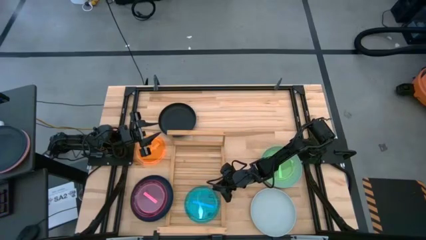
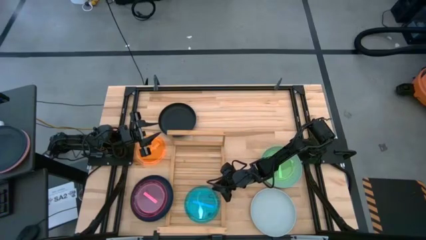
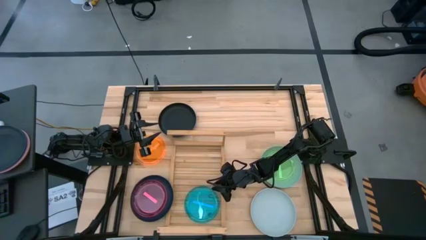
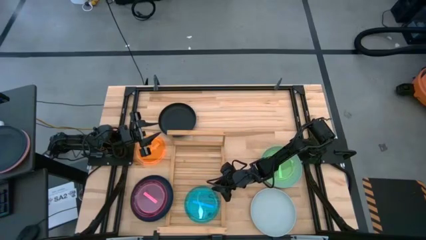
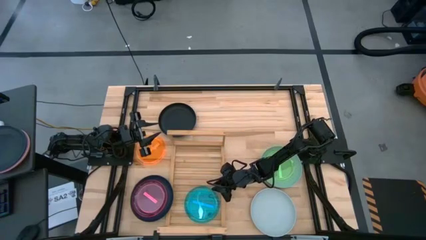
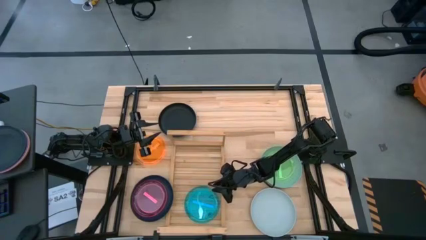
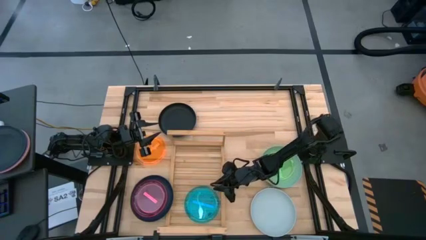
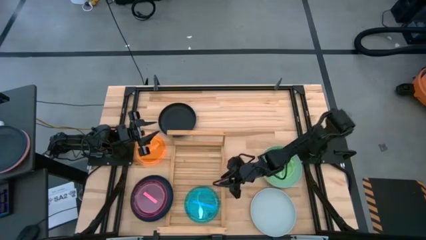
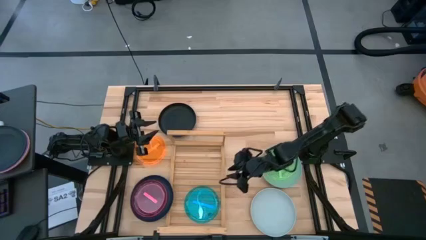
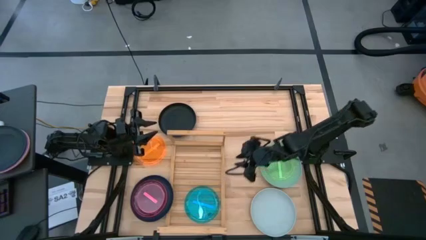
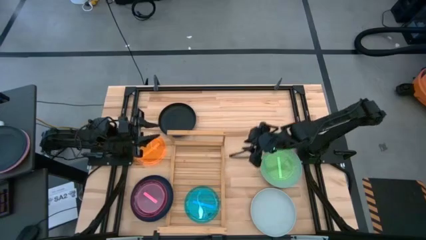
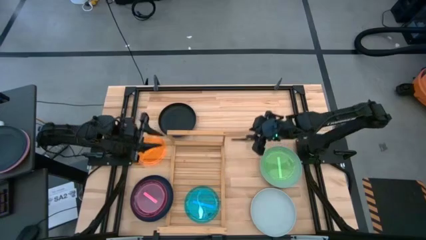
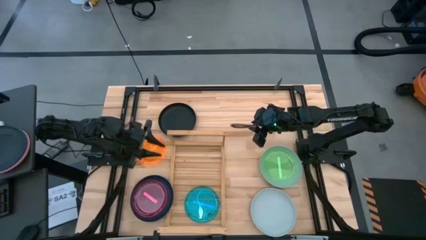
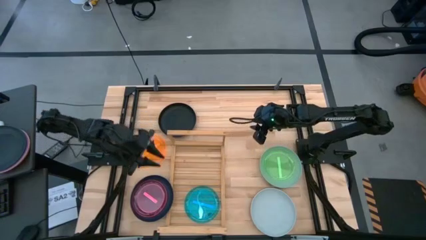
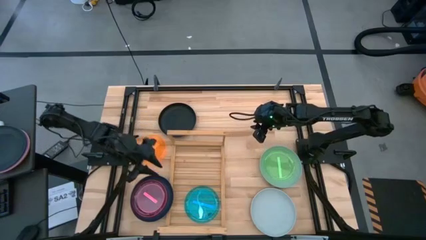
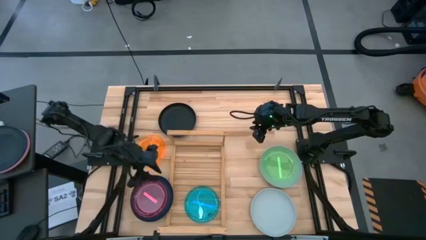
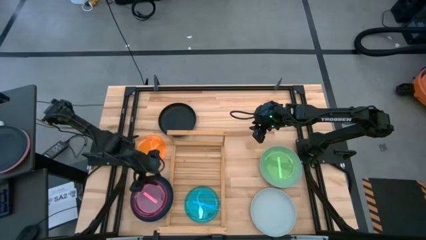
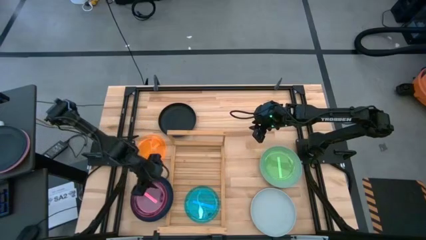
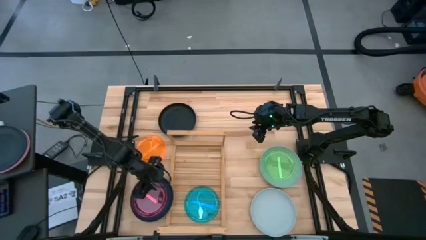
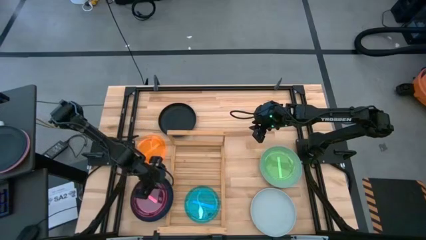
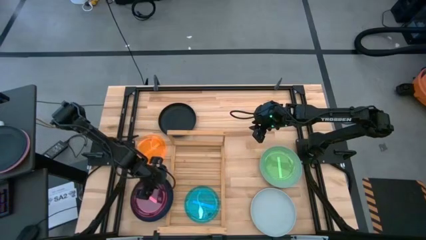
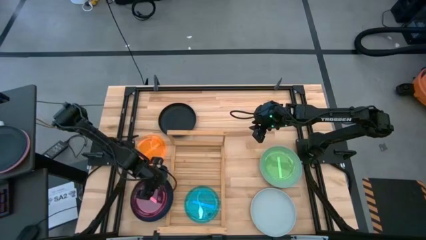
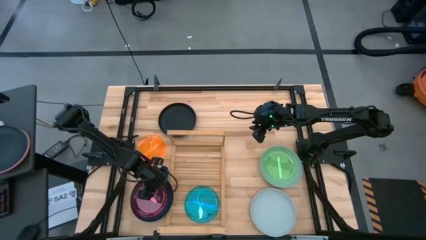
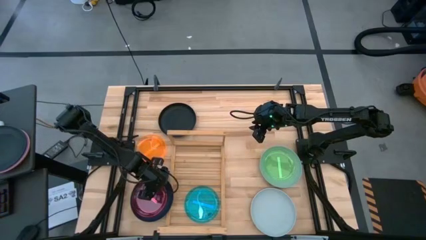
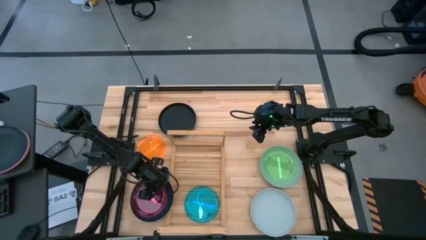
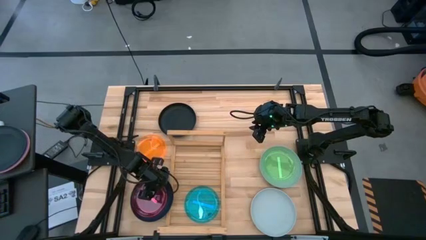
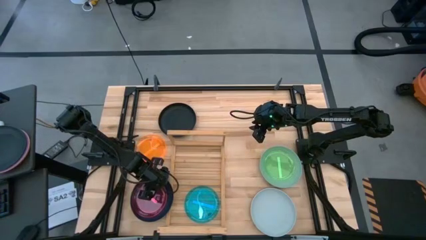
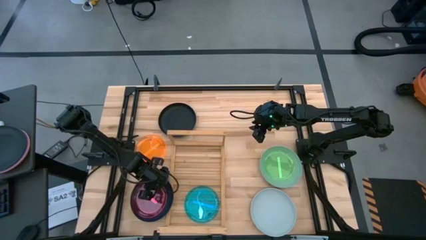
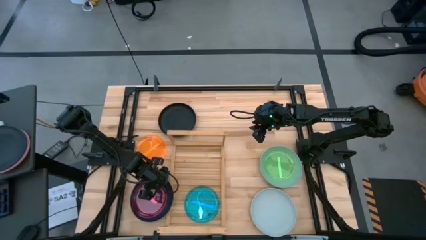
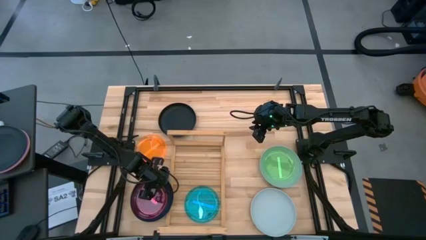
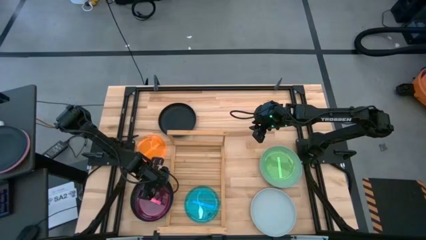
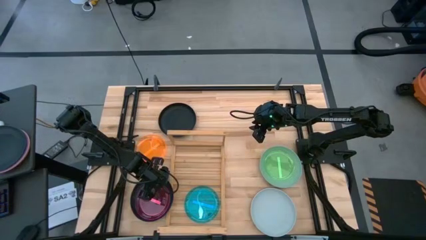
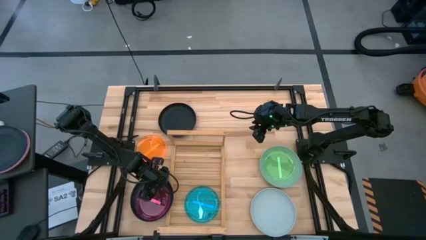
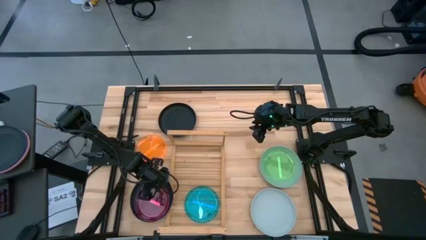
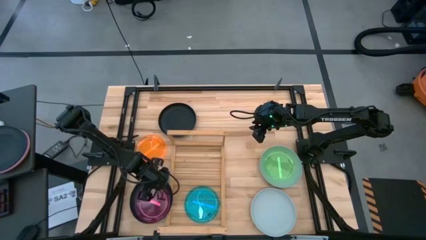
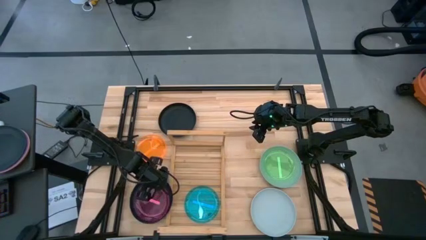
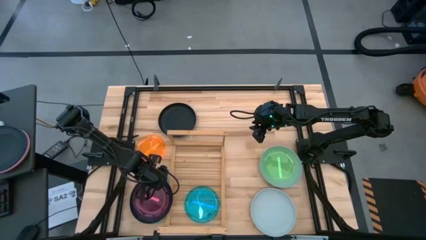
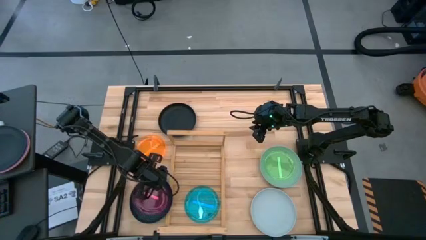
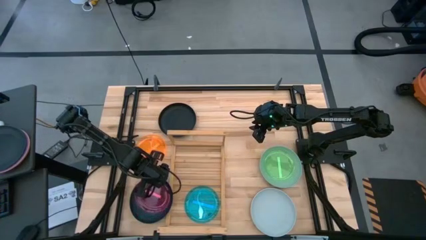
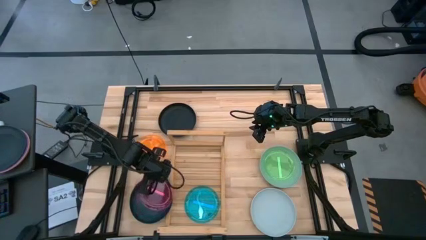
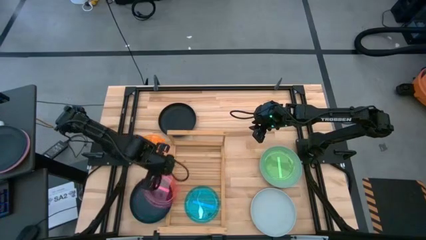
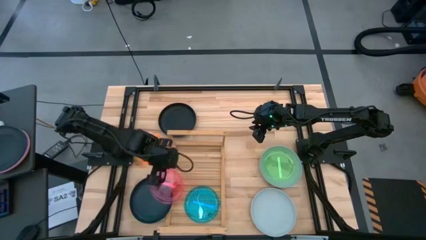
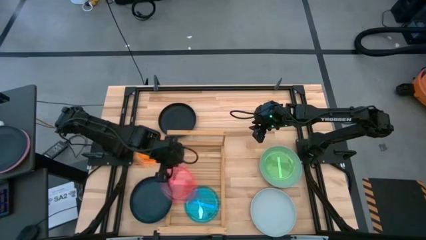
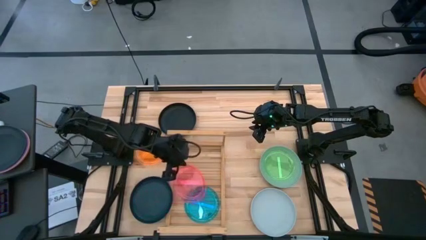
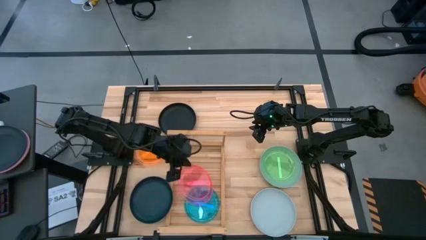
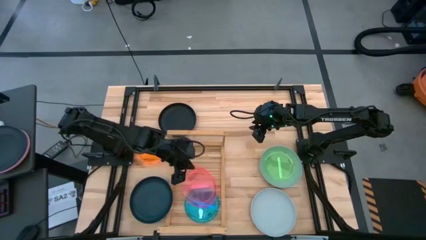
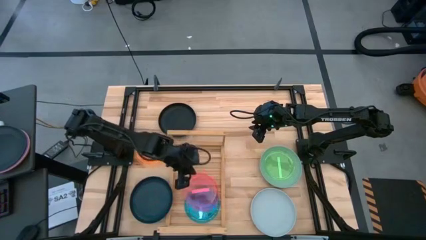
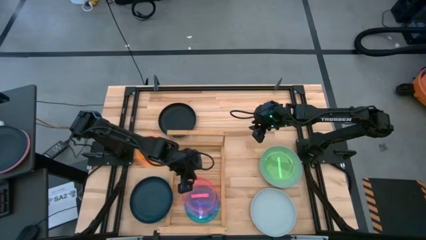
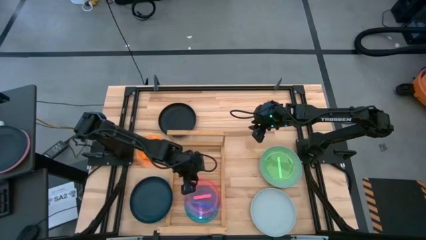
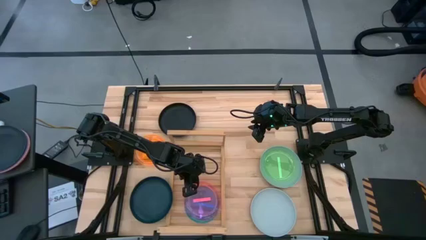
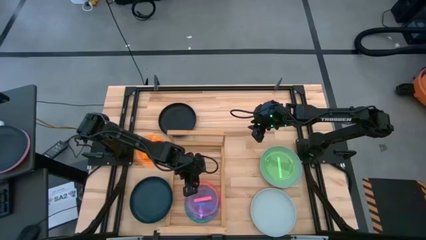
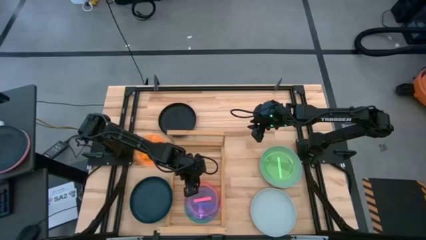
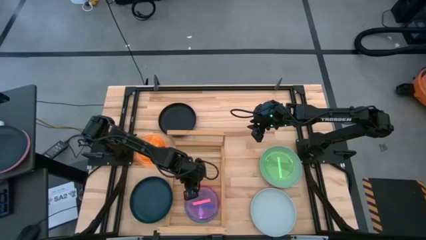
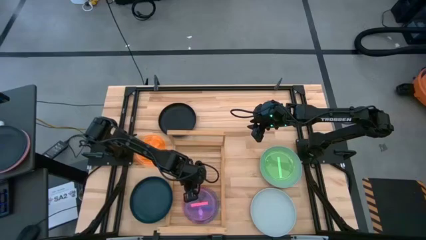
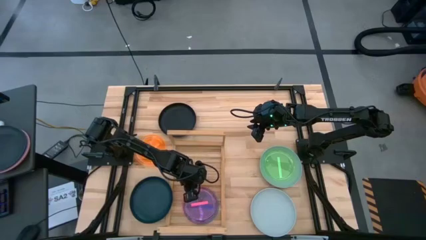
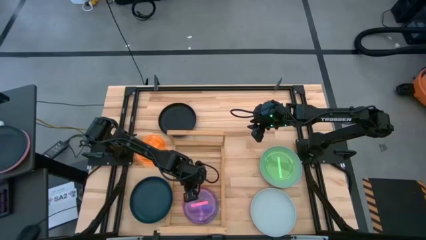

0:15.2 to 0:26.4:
Task: Place and stack plates onto a shelf
Stack the small pink transparent plate on top of the small blue transparent plate on the shelf
